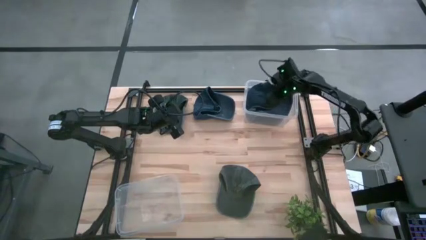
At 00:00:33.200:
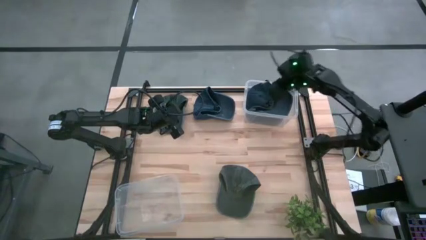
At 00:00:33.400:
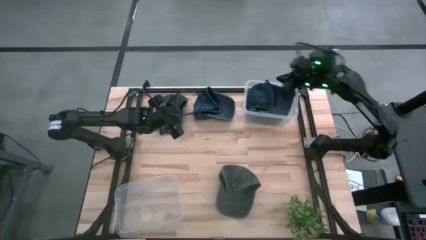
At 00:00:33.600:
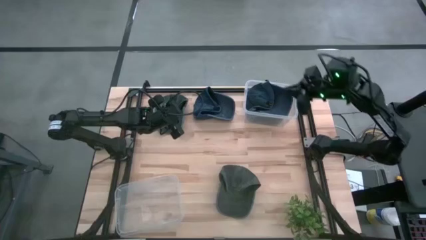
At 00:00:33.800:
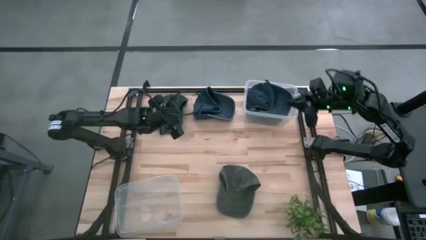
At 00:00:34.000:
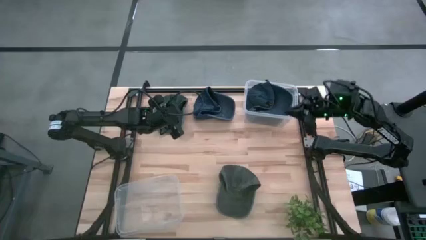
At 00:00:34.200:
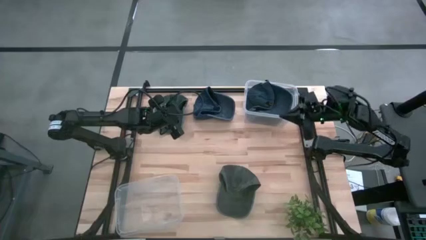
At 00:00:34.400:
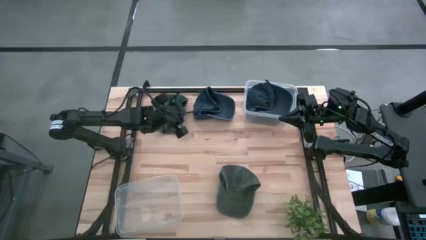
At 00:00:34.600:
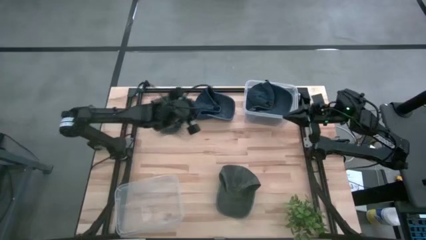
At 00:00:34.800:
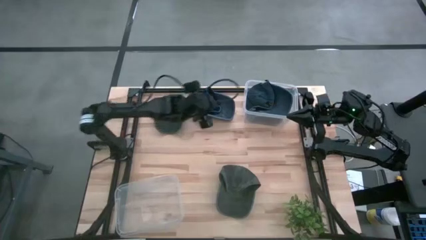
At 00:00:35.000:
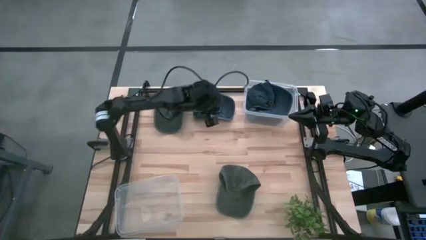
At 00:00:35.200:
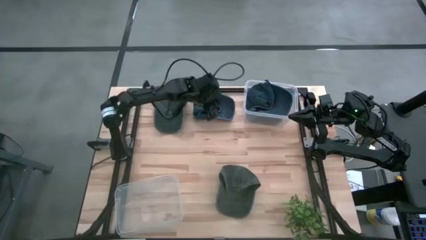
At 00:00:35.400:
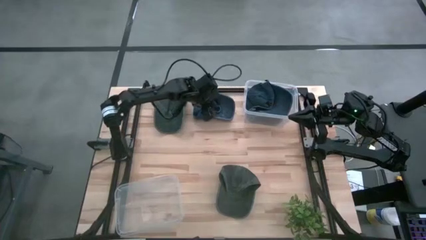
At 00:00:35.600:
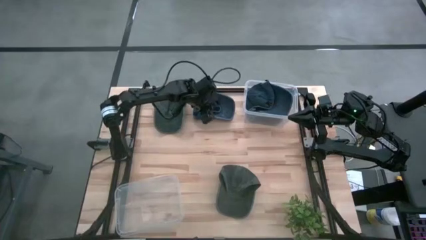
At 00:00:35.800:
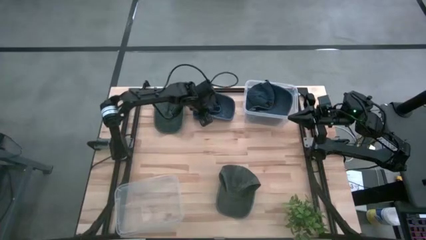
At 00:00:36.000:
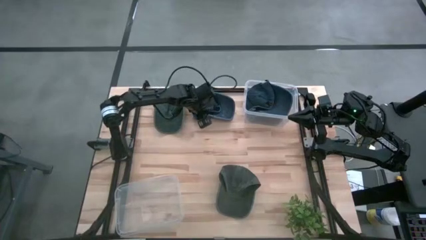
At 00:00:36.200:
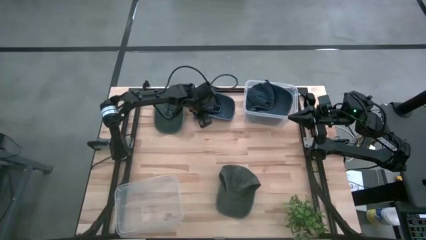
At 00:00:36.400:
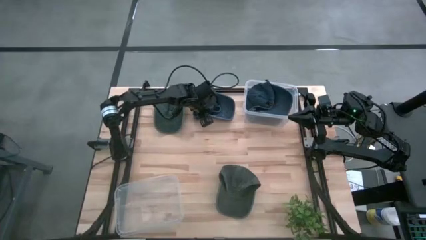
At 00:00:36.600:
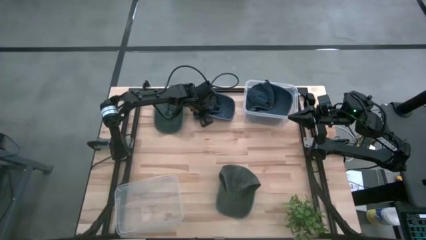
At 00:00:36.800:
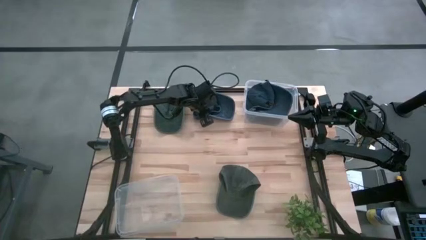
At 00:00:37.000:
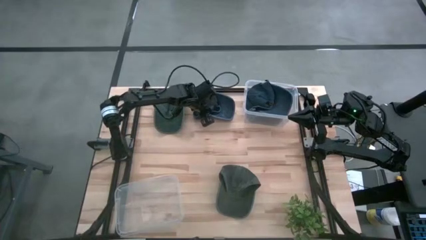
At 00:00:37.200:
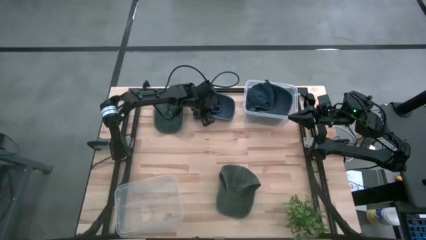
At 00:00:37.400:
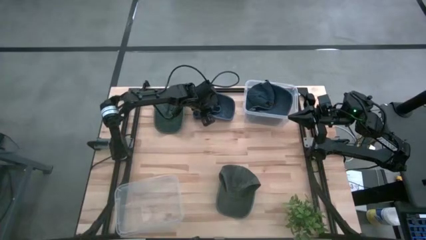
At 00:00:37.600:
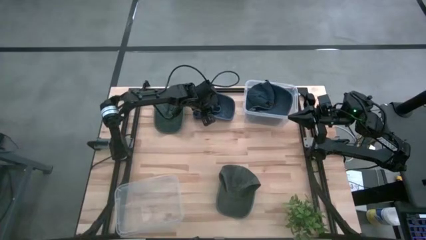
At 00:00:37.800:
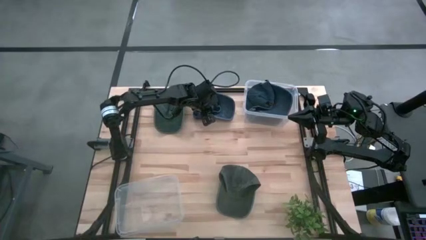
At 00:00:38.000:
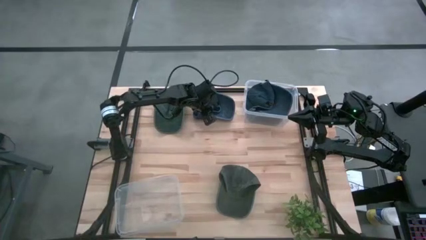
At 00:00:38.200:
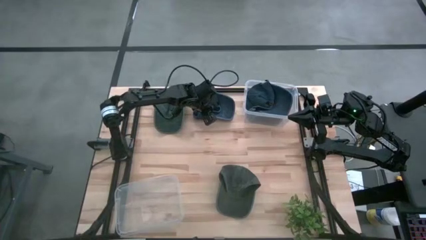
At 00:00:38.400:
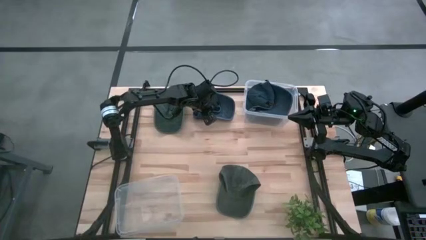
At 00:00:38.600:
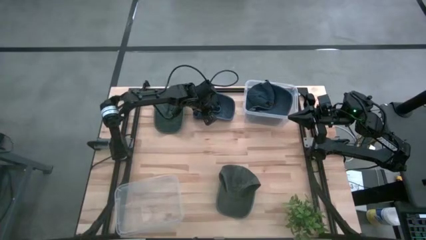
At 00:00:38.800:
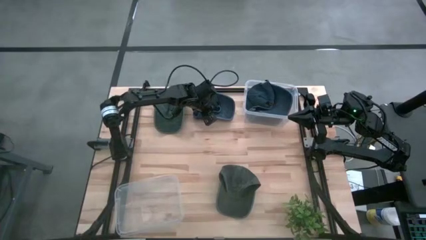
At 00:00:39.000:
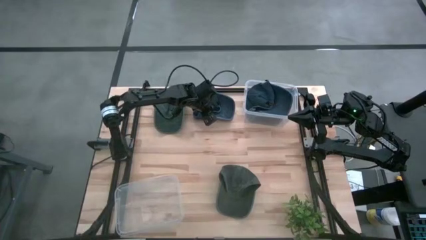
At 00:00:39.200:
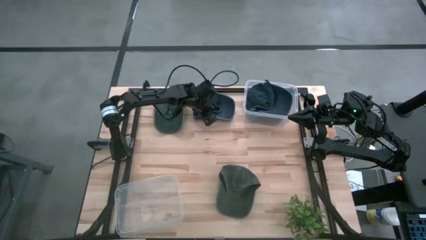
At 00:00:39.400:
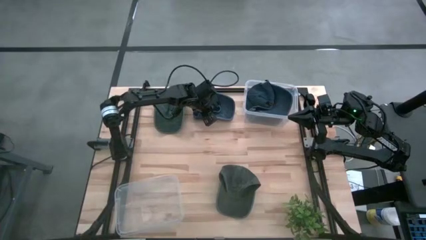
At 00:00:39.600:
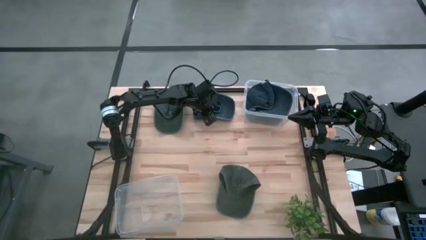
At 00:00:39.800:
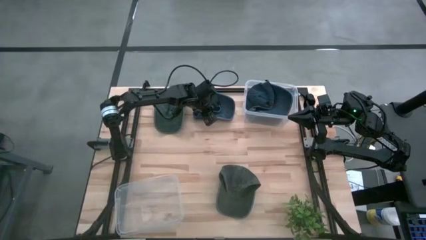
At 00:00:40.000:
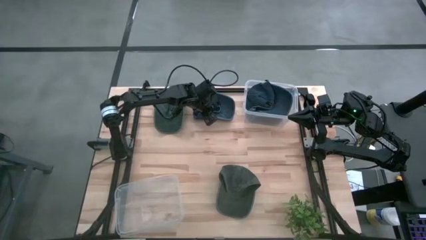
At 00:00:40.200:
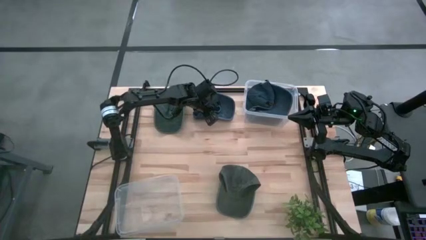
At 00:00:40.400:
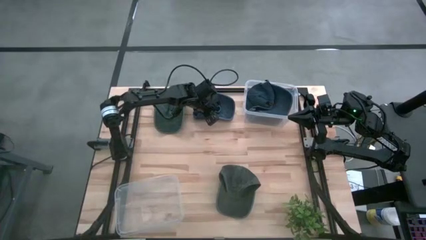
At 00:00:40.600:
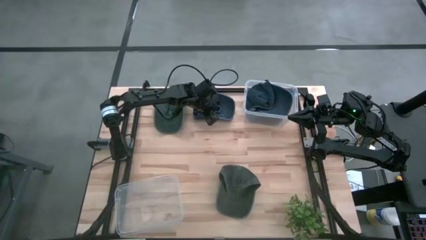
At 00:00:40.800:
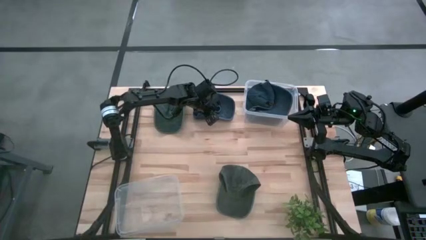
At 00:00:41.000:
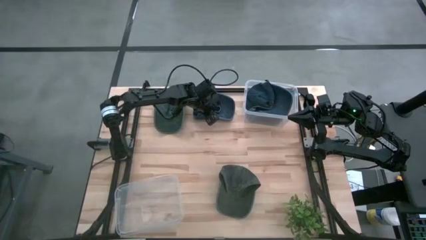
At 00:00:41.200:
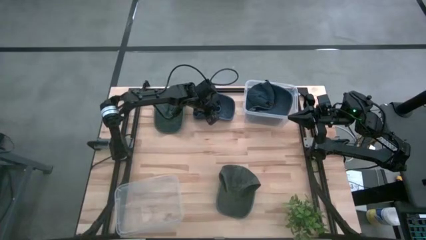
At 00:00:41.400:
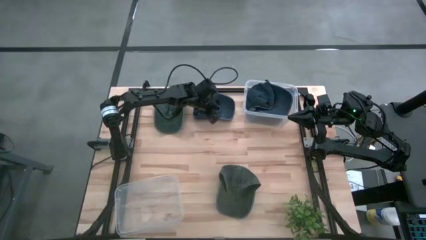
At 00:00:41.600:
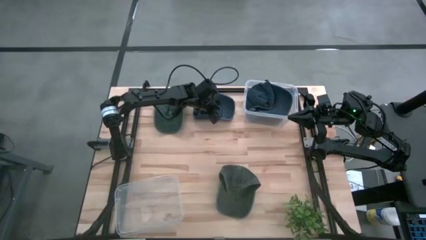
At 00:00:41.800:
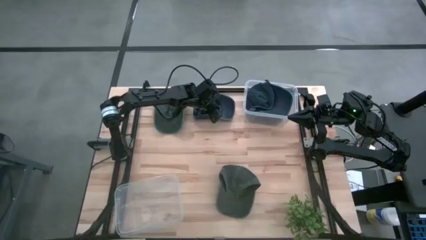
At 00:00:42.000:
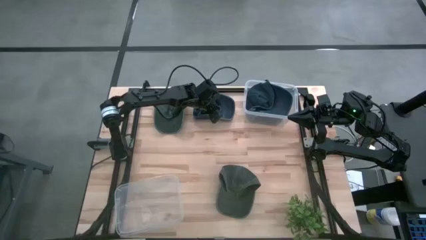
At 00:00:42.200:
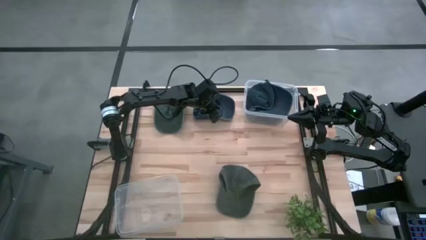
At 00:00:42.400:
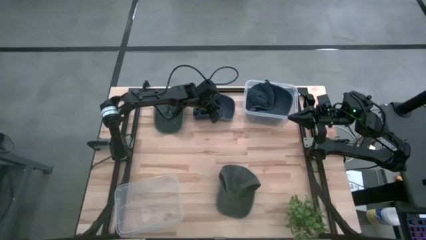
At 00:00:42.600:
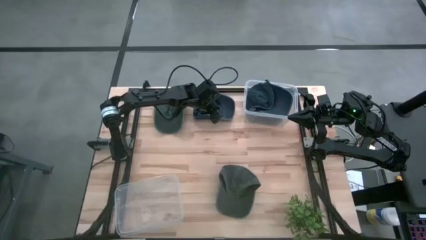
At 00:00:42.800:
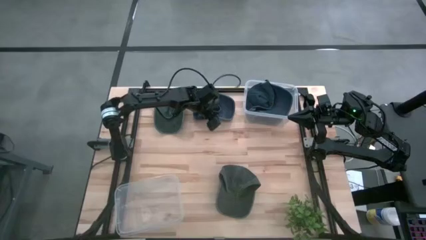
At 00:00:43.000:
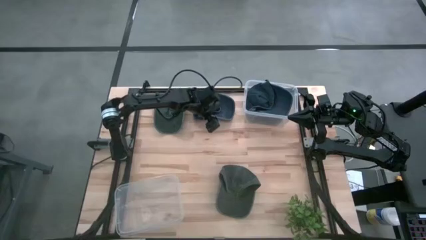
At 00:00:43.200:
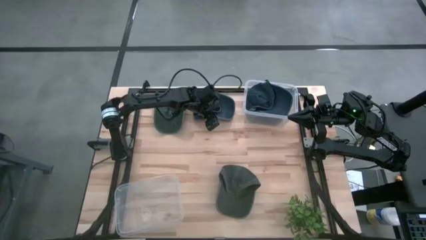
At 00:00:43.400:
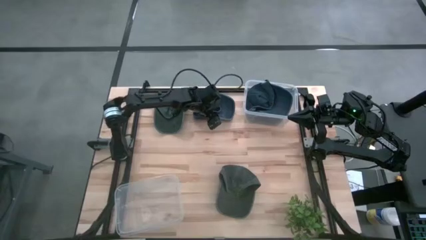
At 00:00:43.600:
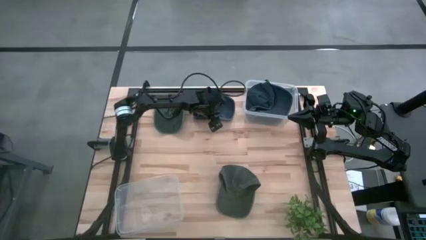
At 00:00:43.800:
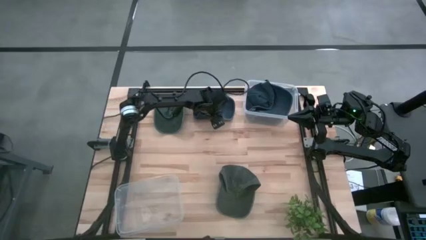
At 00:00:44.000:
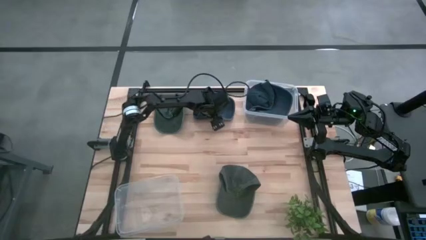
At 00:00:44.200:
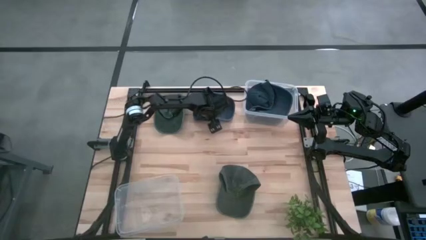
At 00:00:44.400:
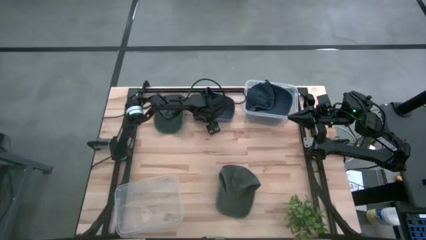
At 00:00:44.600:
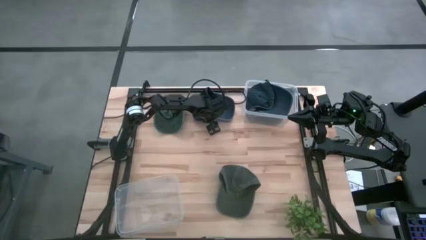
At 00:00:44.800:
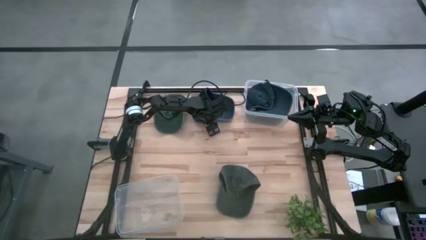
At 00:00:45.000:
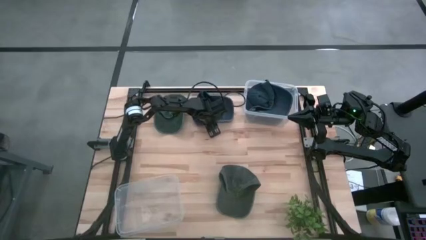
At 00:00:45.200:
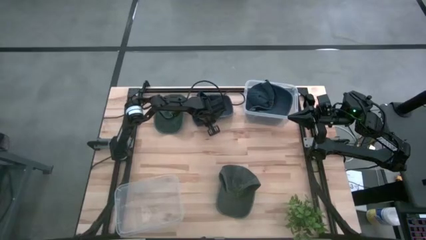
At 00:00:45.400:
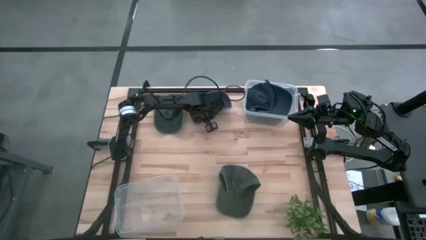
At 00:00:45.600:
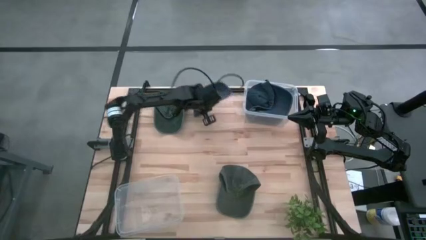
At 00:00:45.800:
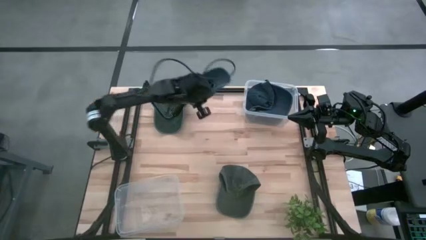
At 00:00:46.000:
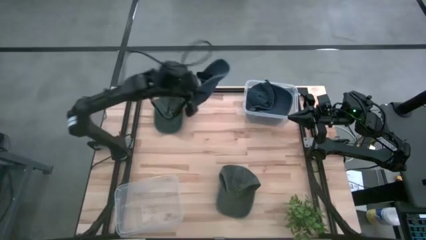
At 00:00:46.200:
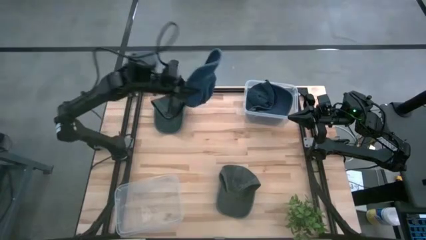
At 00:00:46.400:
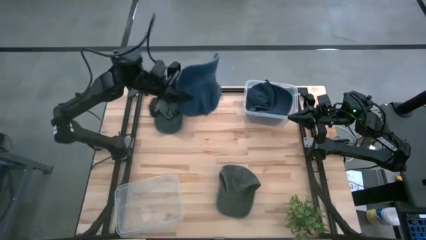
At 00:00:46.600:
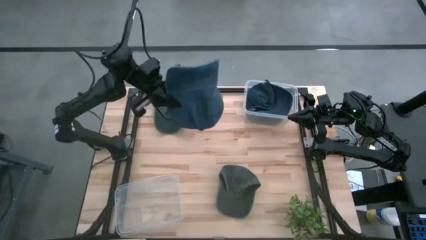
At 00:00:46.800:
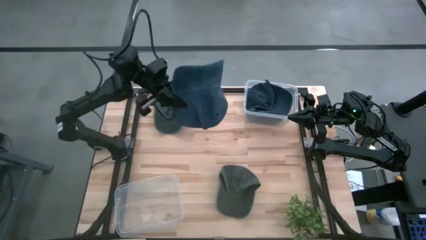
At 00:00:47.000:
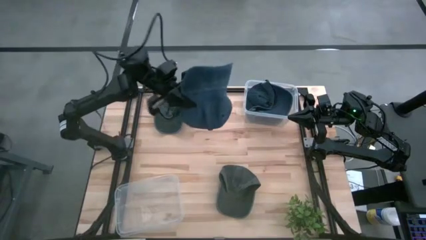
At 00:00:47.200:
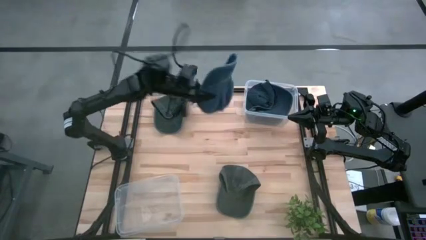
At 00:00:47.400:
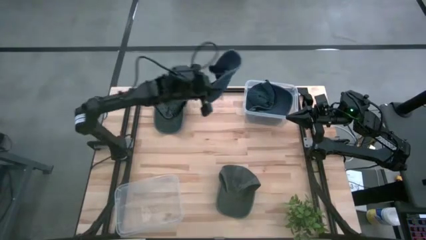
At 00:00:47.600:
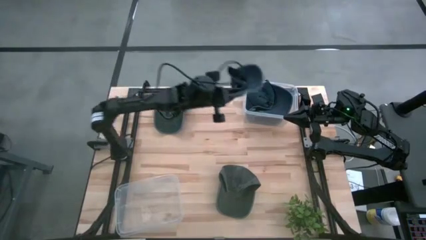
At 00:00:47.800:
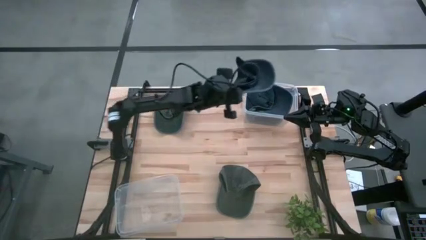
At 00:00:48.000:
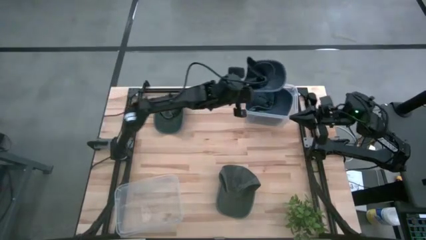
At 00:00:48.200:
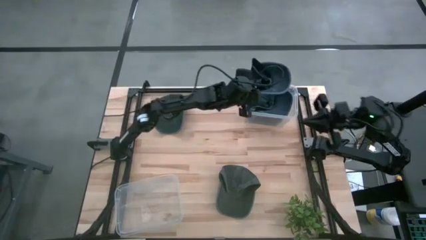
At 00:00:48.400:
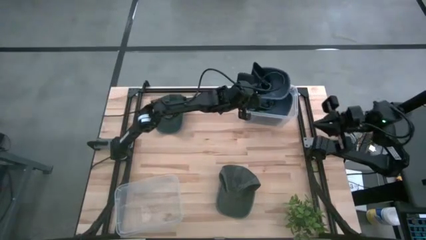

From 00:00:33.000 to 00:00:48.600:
Task: Pick & Place hat
Put the blue cap into the top transparent bin
